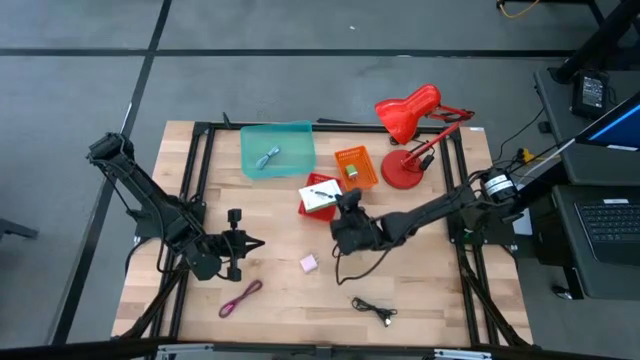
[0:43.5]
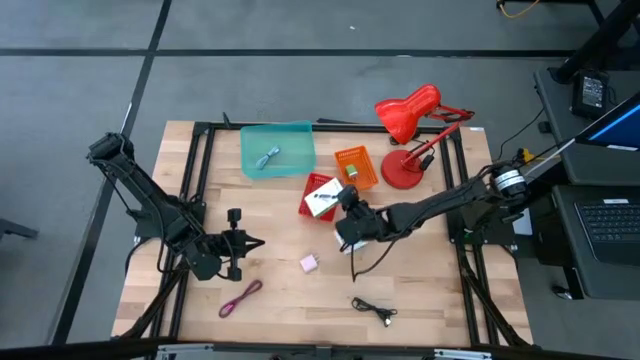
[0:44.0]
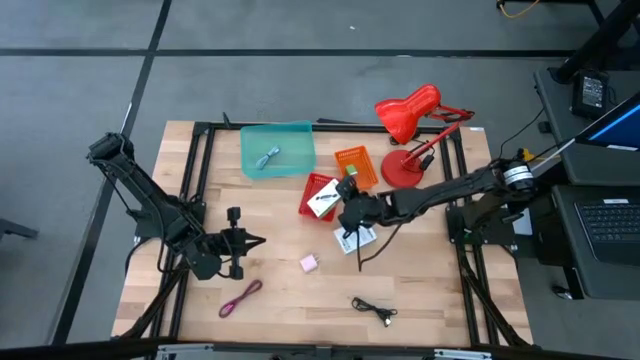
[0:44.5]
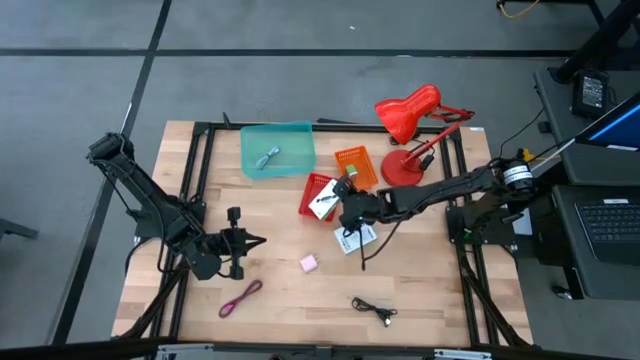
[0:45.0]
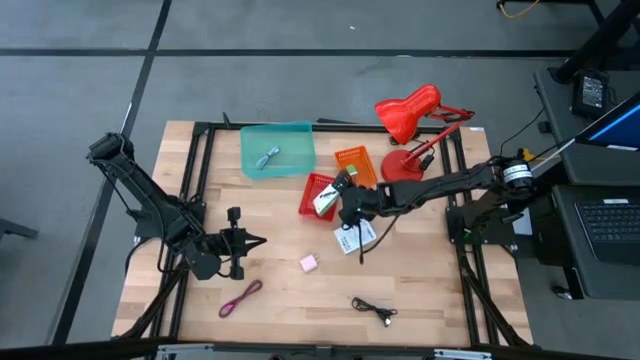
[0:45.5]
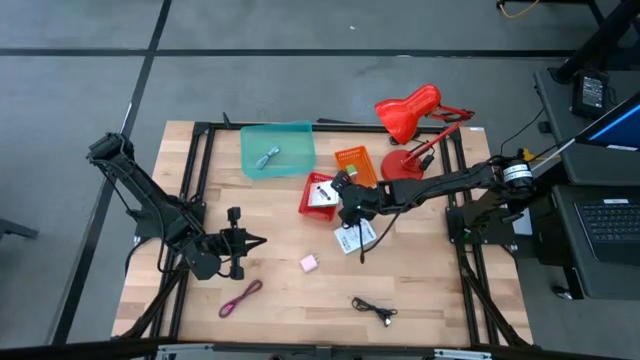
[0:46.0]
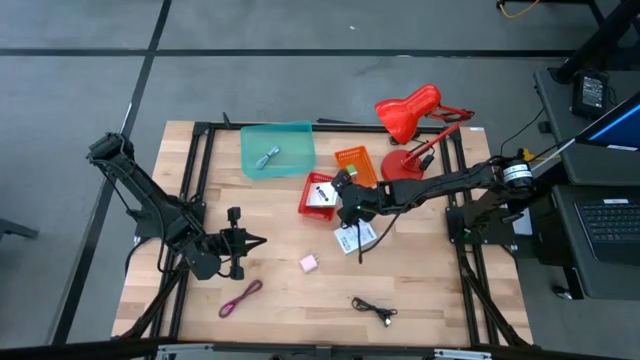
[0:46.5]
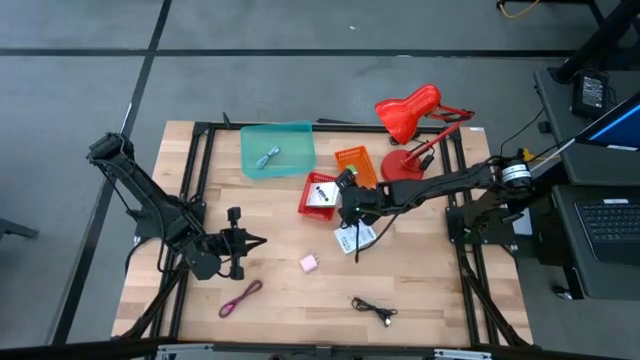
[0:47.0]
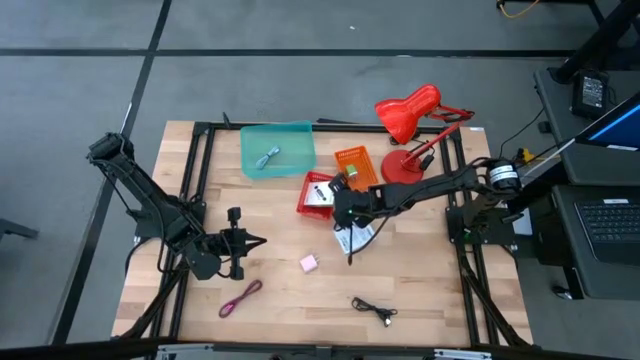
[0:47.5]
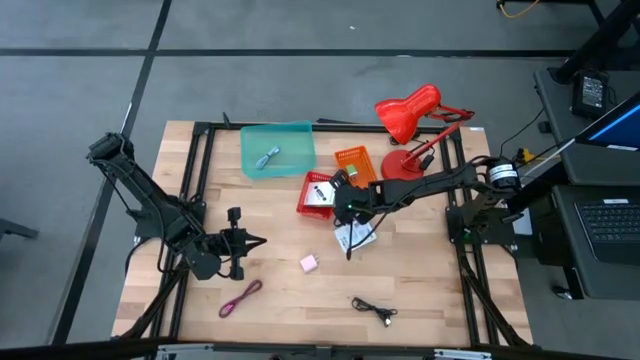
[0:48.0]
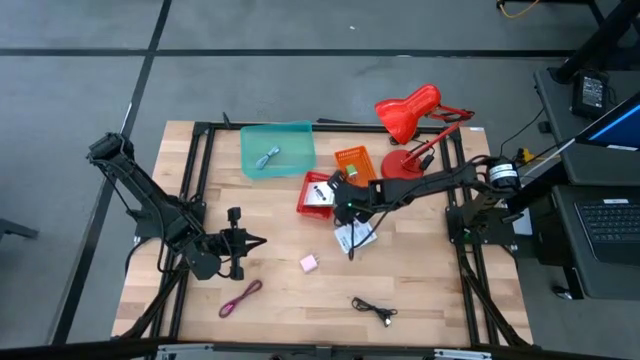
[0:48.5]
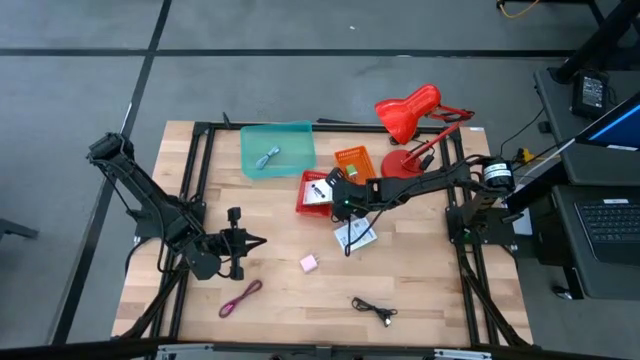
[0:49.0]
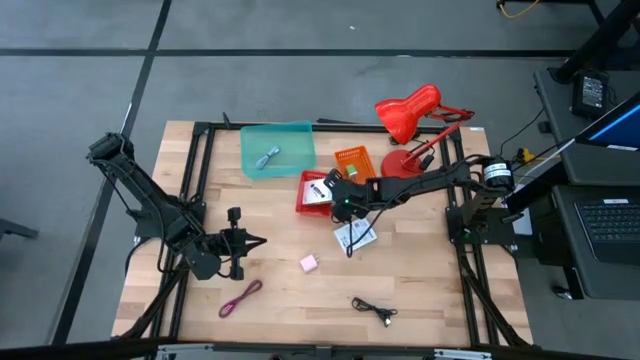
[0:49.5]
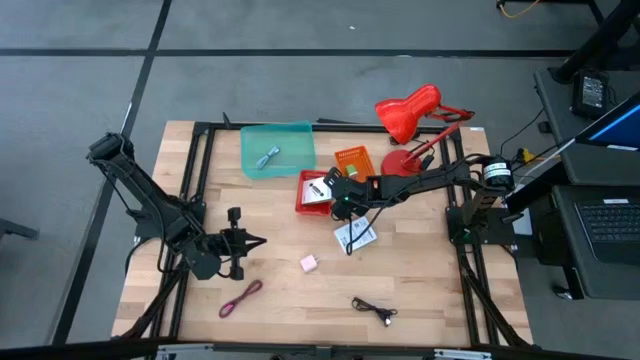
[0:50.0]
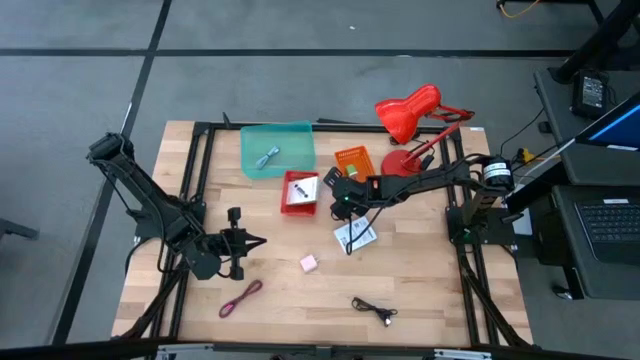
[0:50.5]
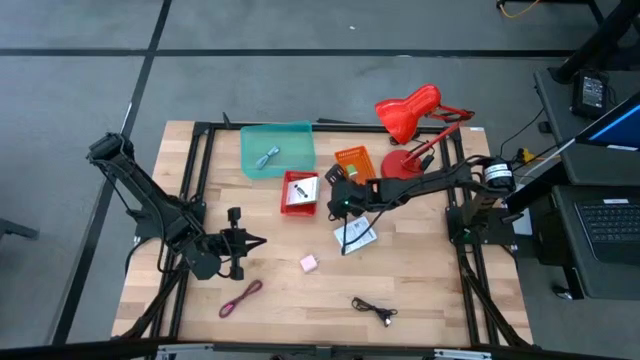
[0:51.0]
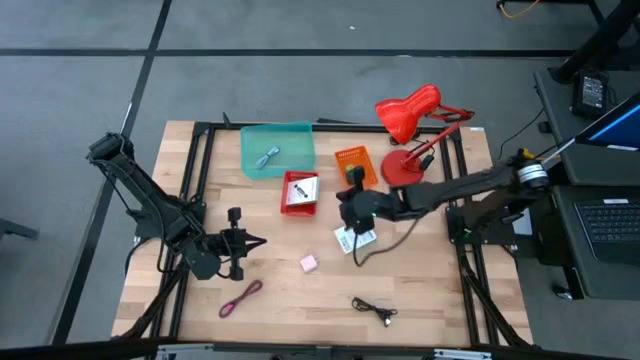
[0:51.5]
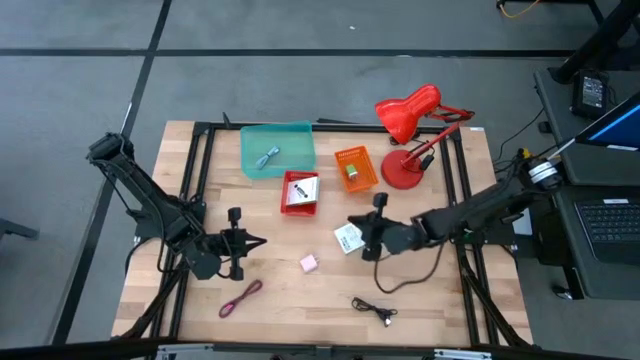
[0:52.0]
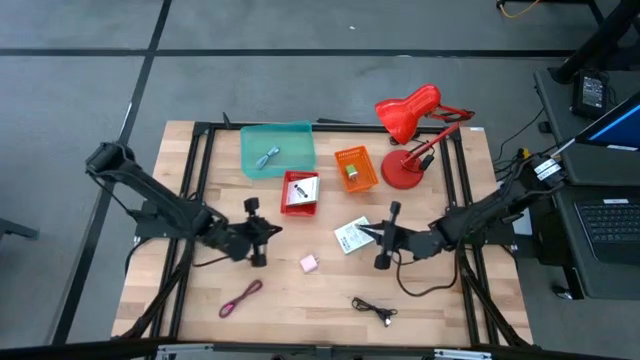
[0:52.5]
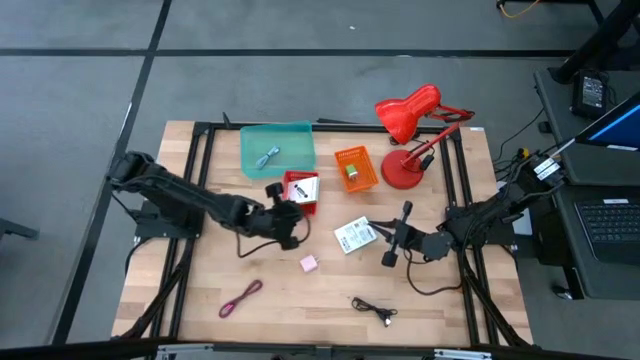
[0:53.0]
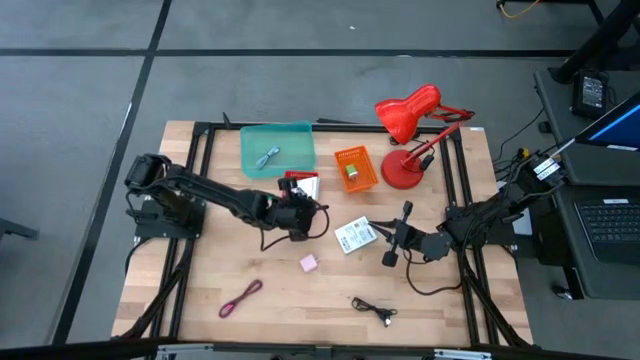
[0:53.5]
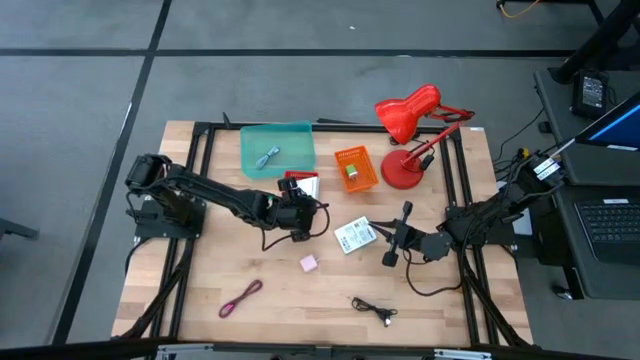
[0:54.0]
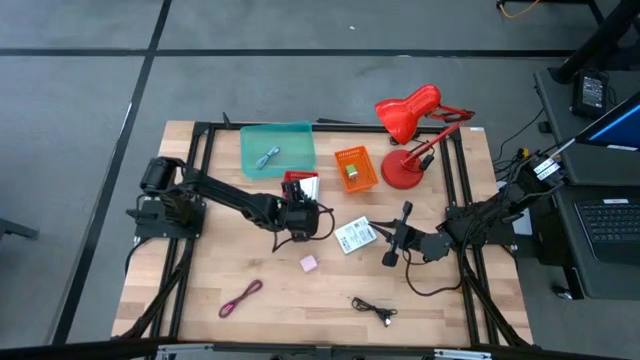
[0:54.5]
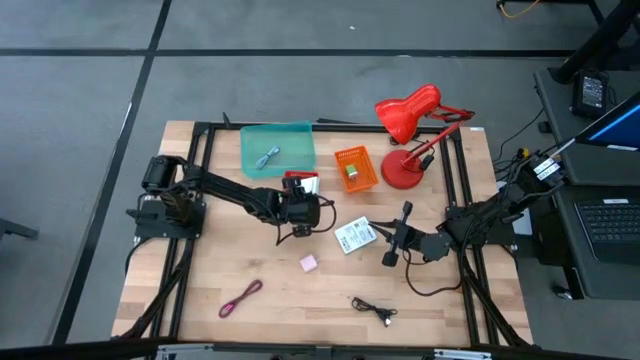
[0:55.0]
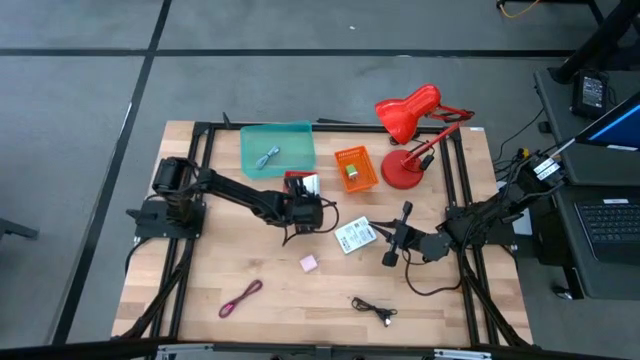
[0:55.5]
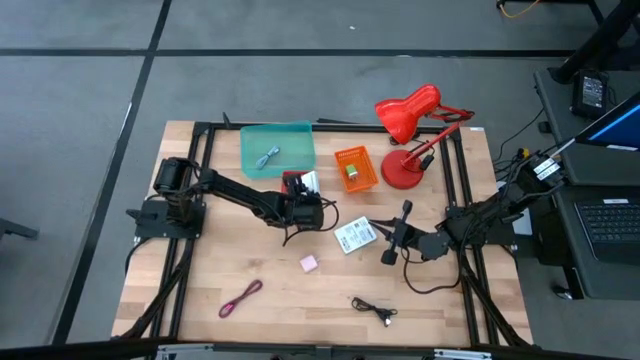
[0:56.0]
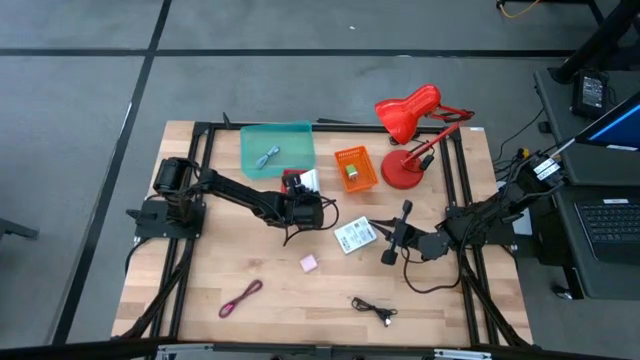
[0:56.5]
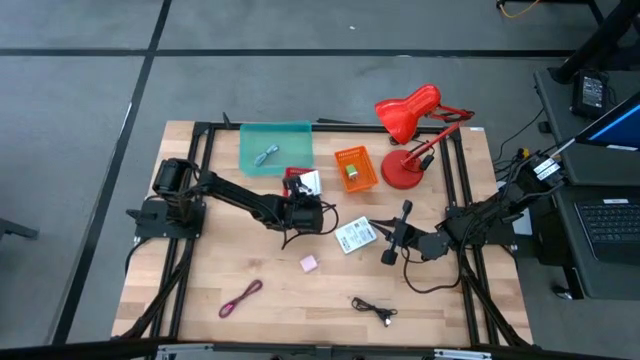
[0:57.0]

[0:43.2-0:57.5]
Task: Pick and place items into bin
Put the left card reader box into the red bin

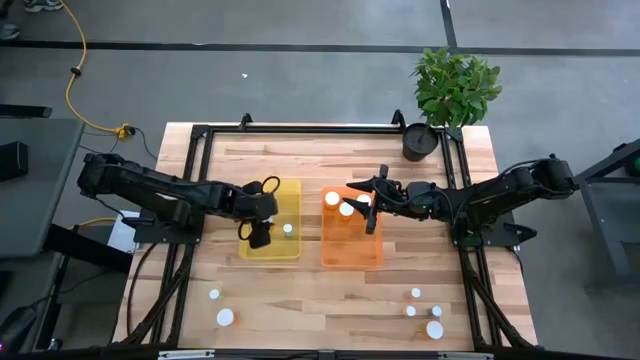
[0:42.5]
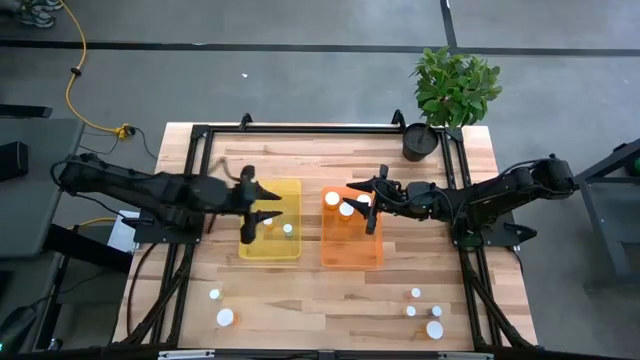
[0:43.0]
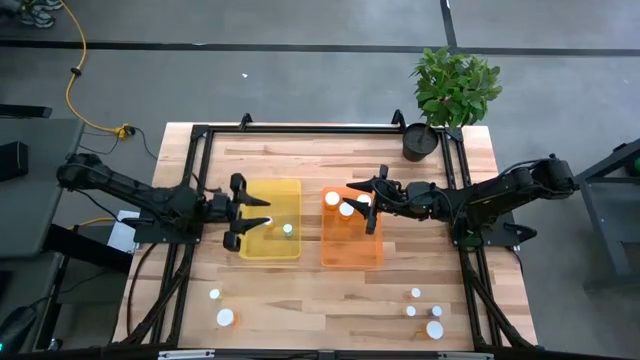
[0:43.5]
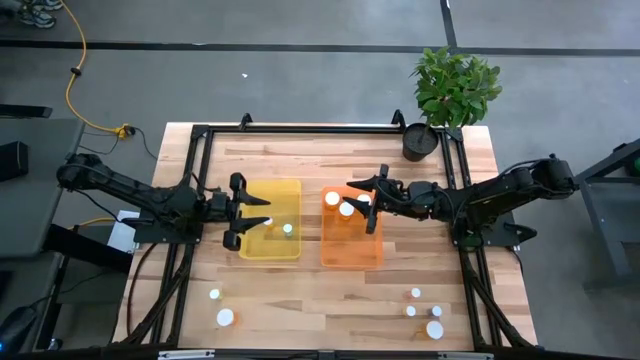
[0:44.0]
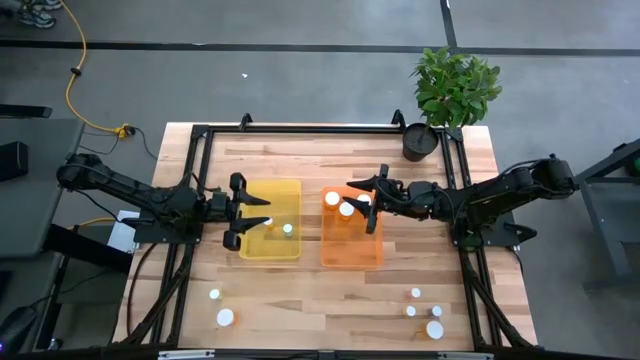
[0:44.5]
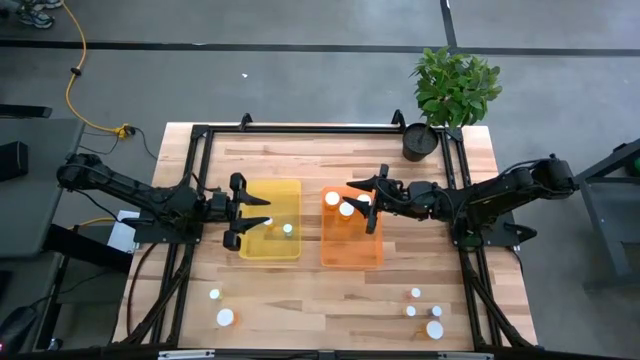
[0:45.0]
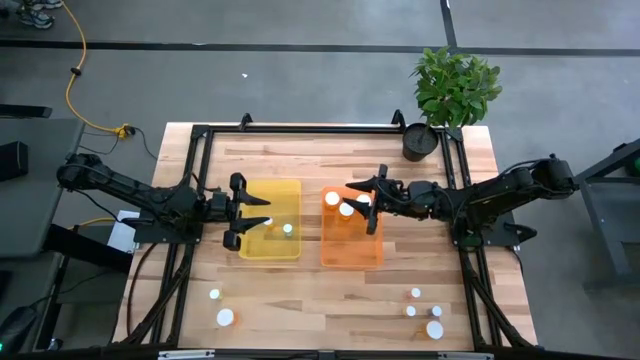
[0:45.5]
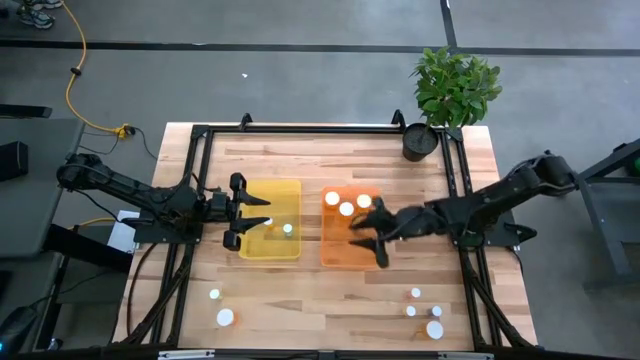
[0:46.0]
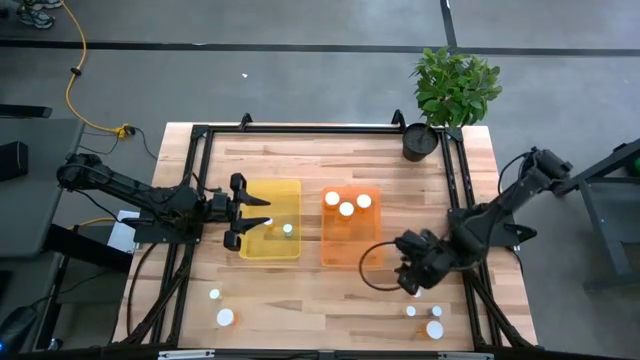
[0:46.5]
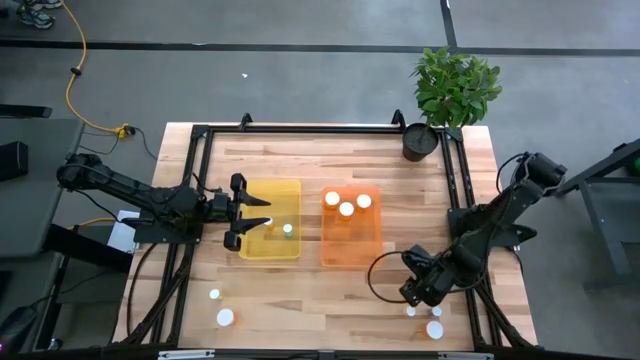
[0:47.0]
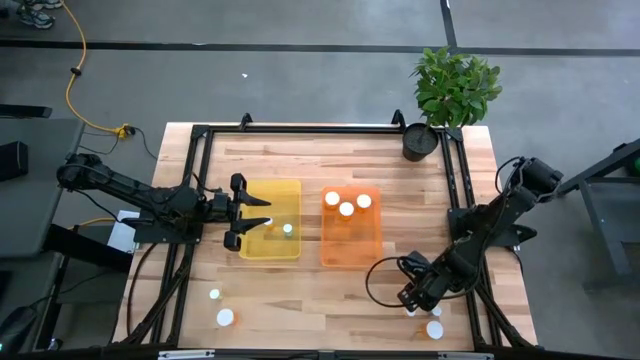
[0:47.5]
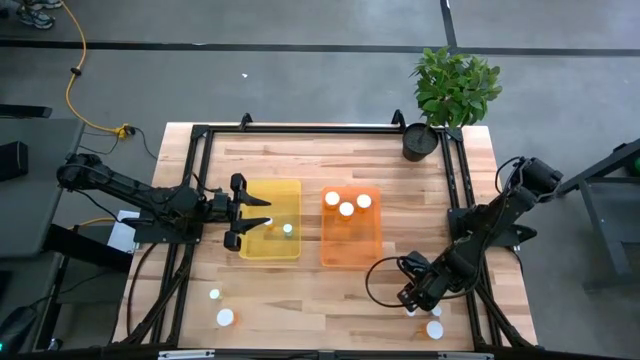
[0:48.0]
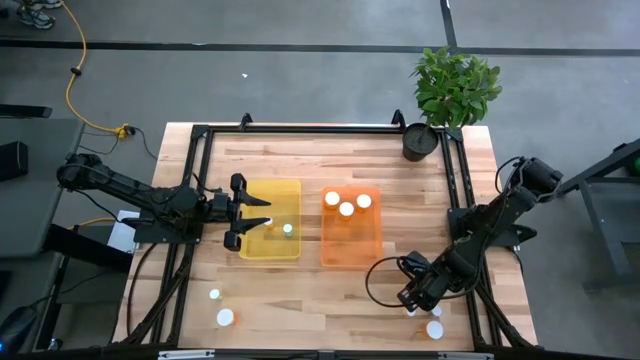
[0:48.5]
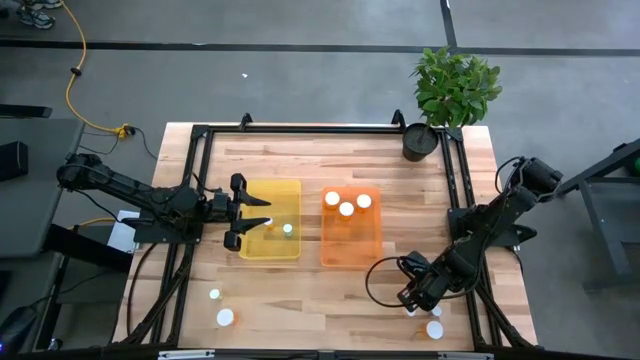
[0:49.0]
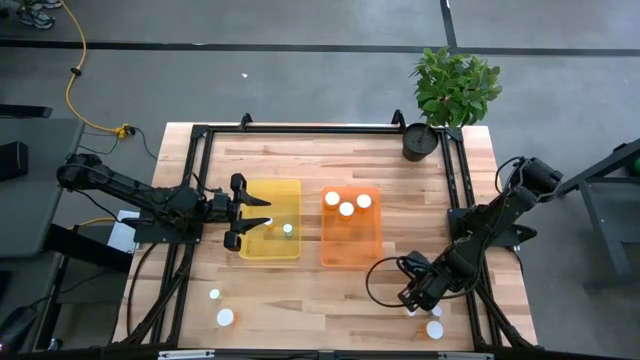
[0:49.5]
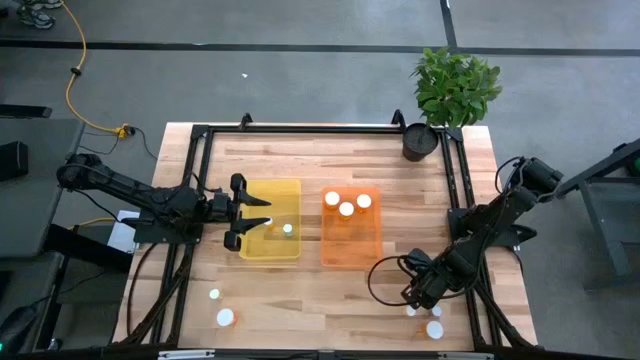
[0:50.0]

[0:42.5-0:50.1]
Task: Pick and place medicine bottles into bin by pill shape (circle, oval)
Put the pink tablet bottle into the yellow bin
